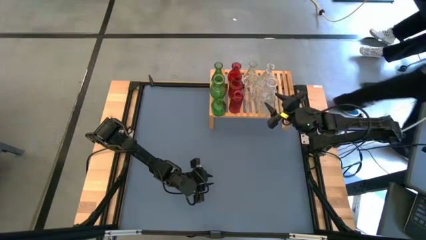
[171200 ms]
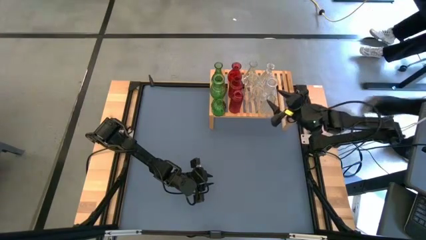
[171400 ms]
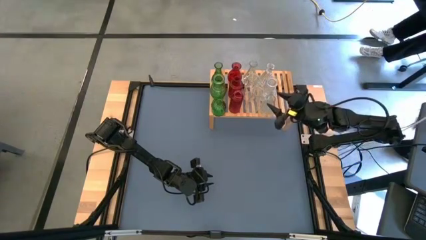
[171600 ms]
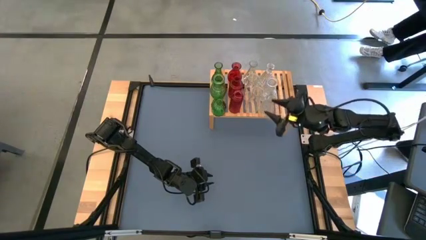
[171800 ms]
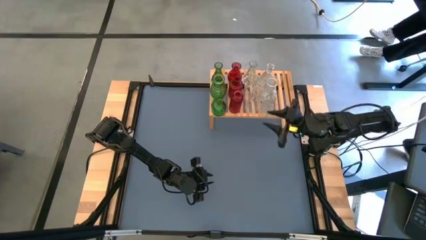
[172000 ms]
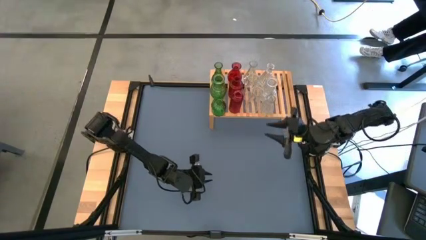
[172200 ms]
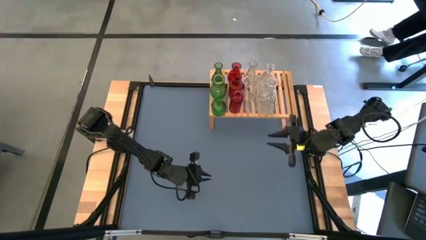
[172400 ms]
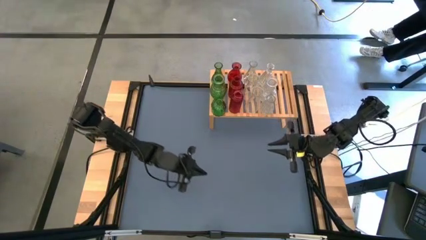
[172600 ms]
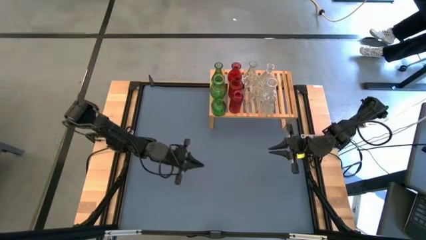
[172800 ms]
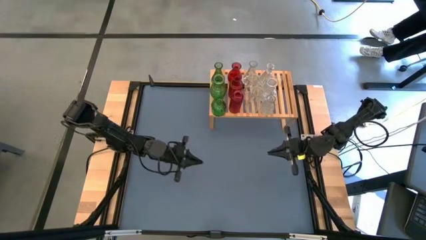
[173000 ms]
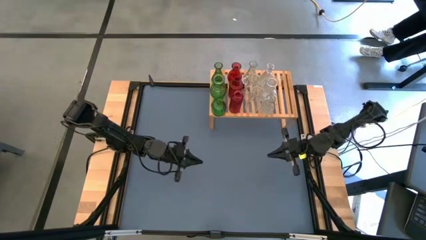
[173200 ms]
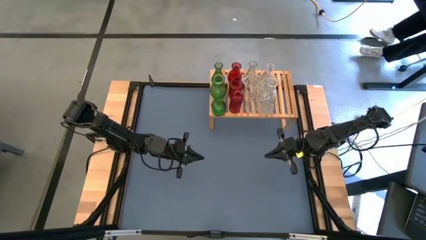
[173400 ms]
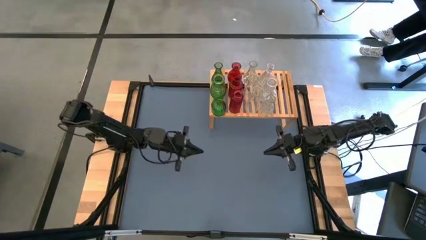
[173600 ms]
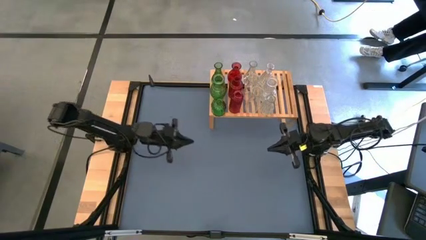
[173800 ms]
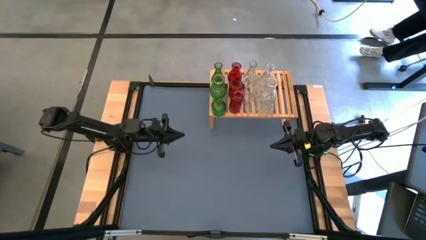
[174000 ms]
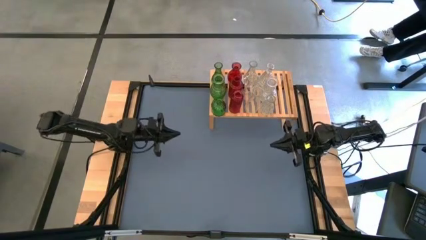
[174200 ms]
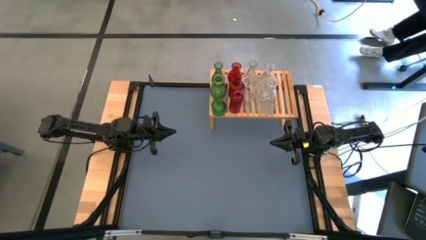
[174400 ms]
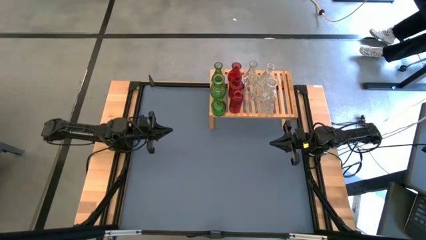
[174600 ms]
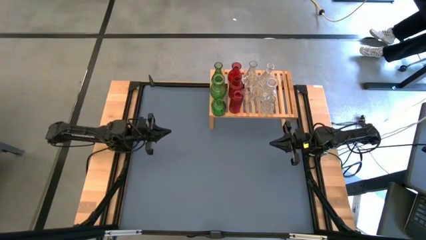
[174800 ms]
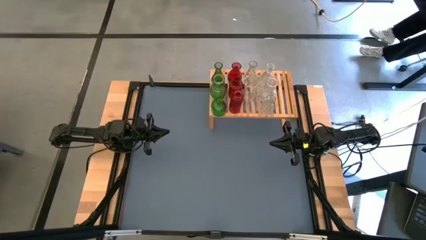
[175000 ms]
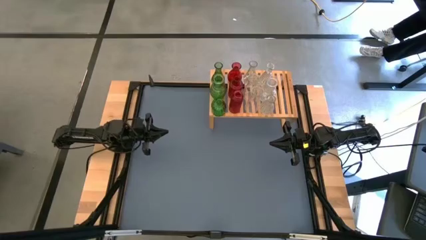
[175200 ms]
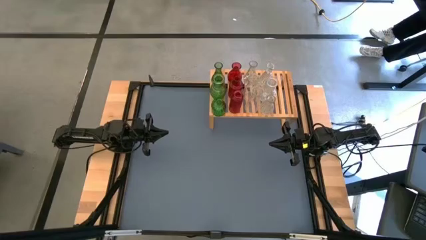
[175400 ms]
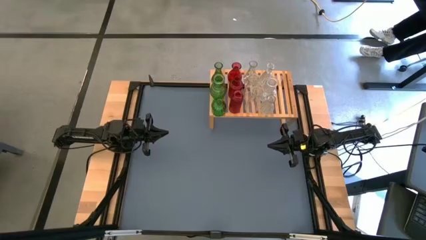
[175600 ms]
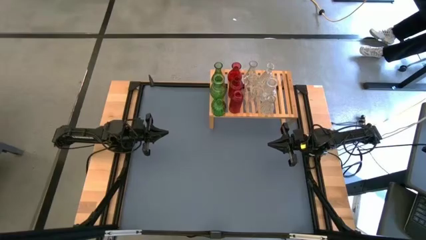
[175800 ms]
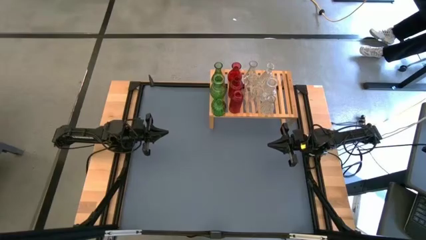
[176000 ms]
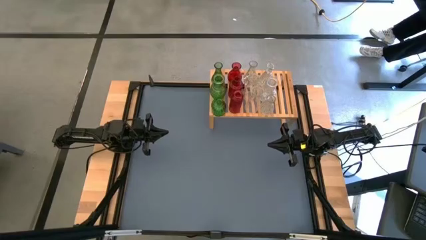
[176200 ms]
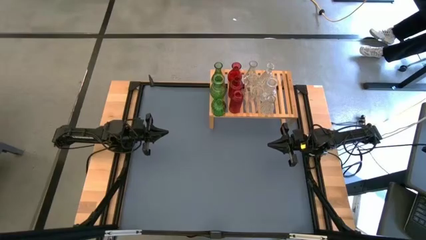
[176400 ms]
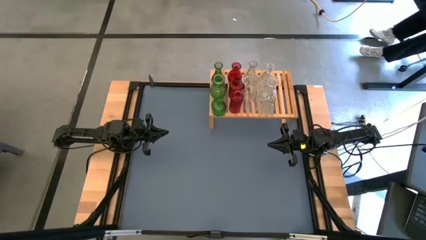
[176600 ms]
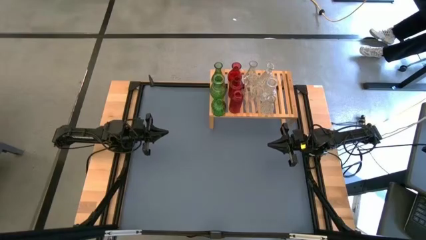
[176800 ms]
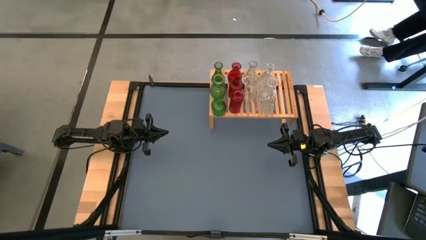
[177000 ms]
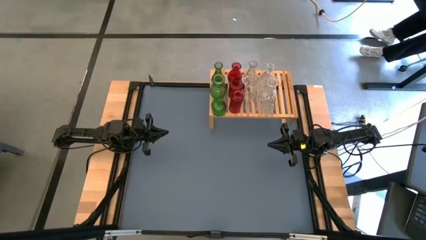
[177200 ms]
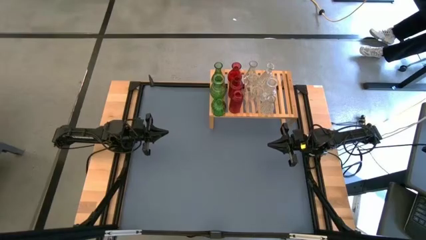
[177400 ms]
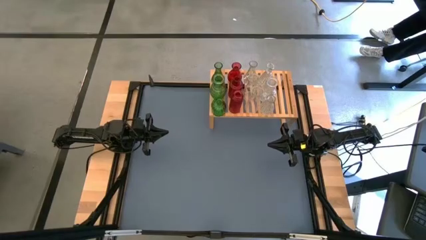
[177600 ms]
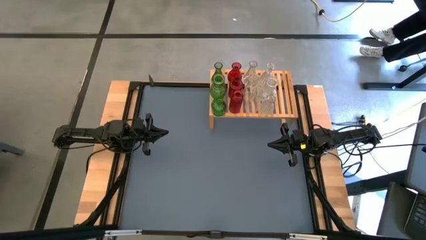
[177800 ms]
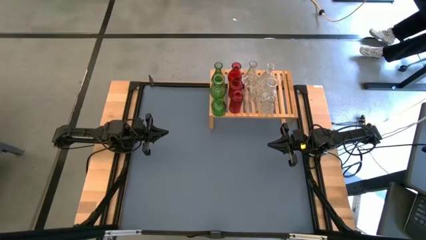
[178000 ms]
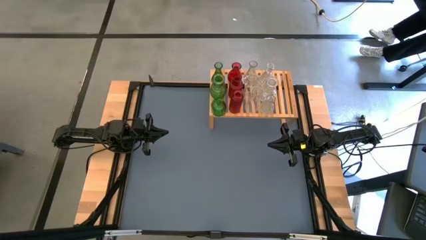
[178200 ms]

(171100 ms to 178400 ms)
Task: sort vases onto shelf
Return to Home Position

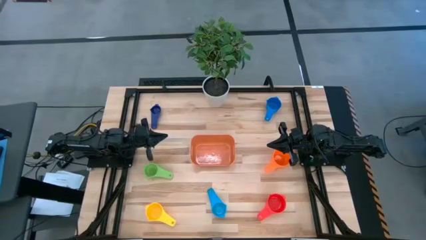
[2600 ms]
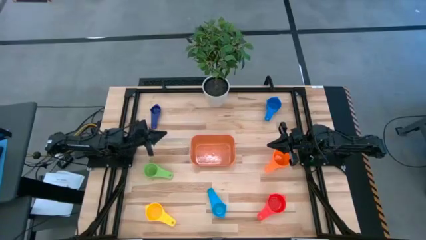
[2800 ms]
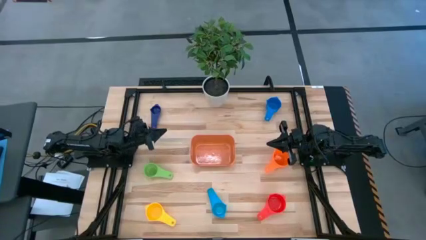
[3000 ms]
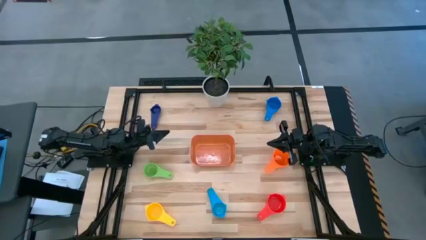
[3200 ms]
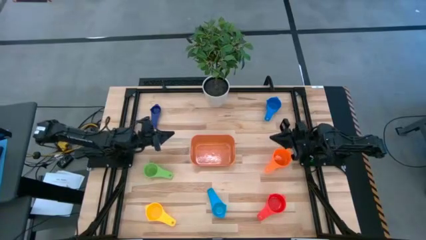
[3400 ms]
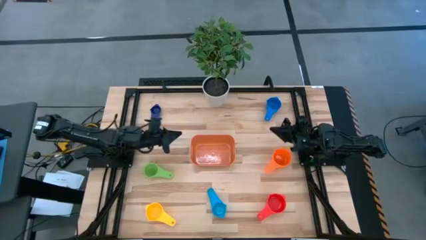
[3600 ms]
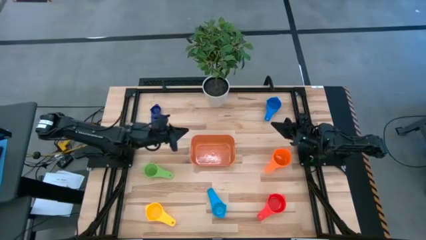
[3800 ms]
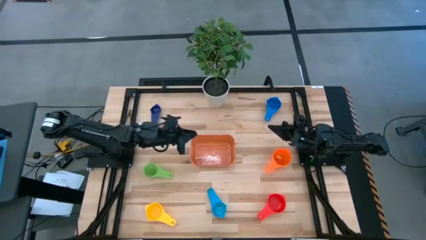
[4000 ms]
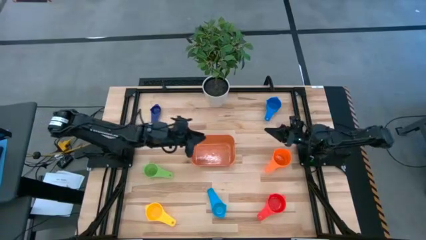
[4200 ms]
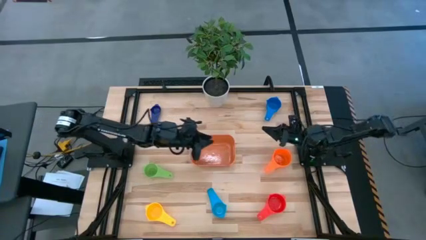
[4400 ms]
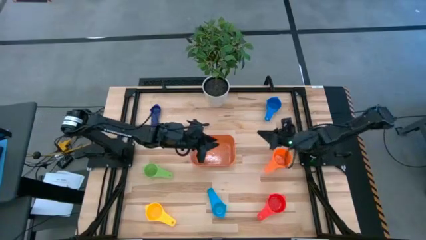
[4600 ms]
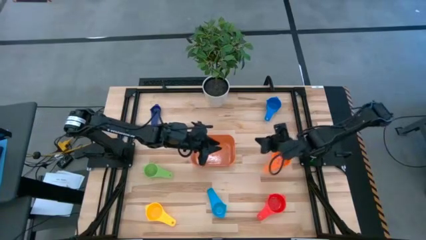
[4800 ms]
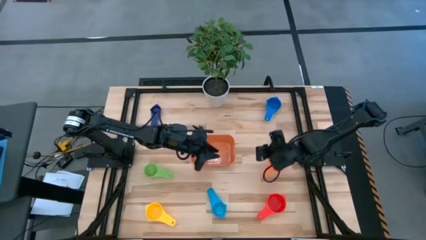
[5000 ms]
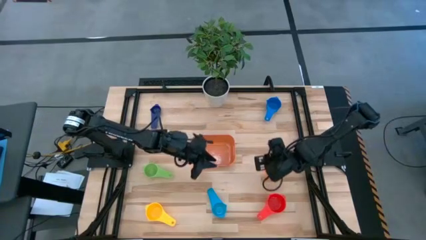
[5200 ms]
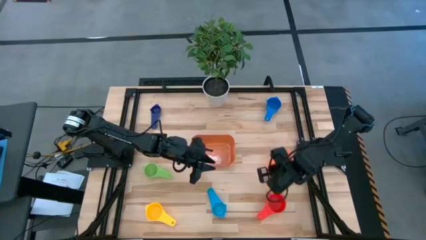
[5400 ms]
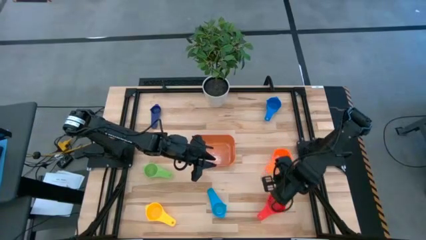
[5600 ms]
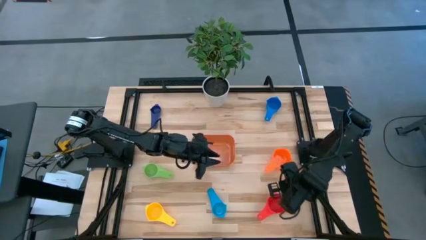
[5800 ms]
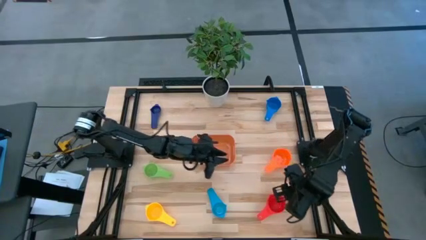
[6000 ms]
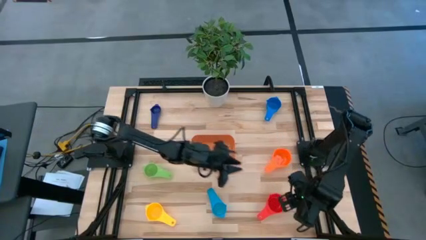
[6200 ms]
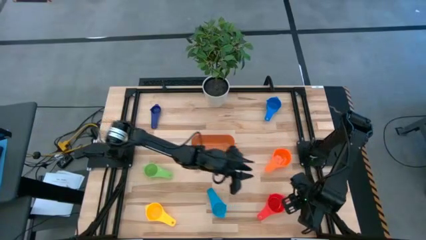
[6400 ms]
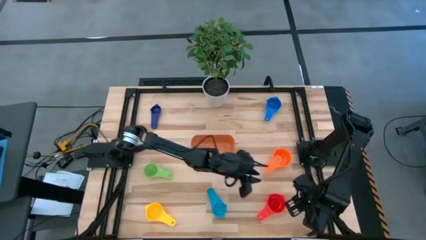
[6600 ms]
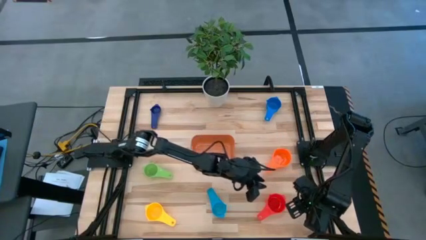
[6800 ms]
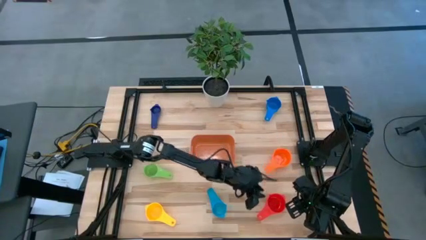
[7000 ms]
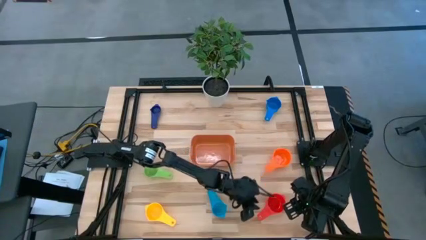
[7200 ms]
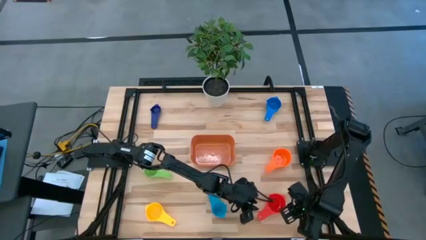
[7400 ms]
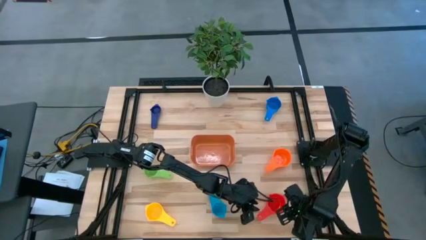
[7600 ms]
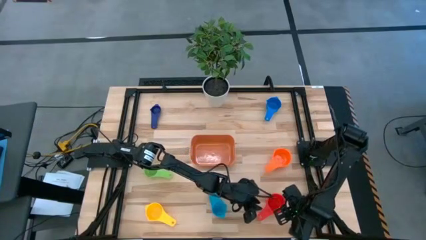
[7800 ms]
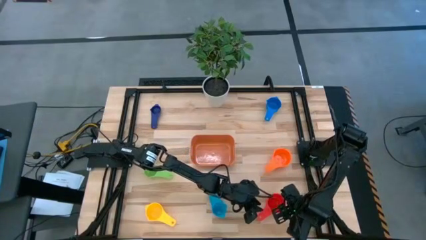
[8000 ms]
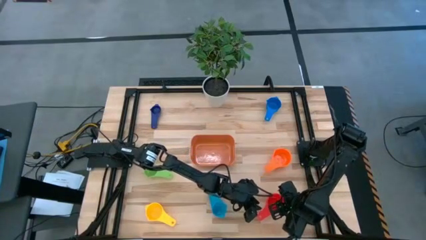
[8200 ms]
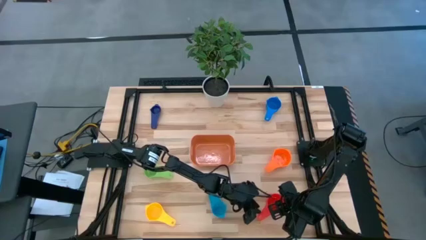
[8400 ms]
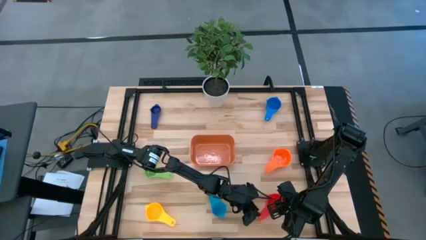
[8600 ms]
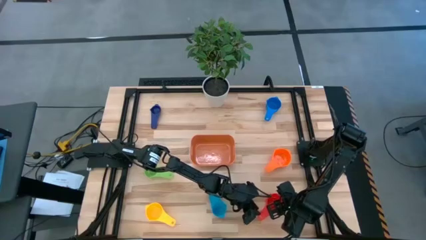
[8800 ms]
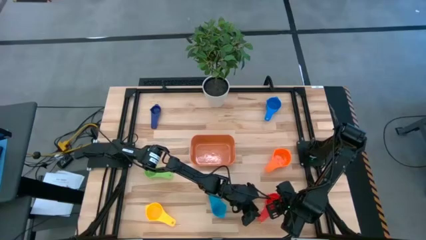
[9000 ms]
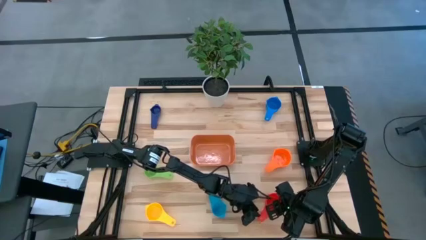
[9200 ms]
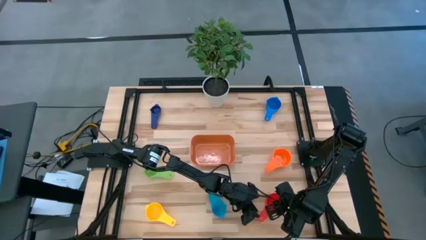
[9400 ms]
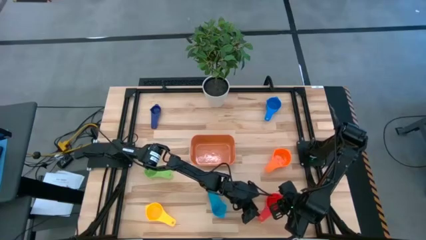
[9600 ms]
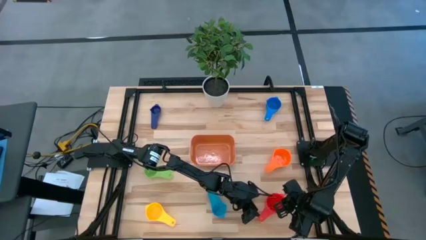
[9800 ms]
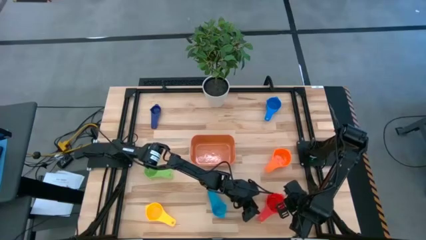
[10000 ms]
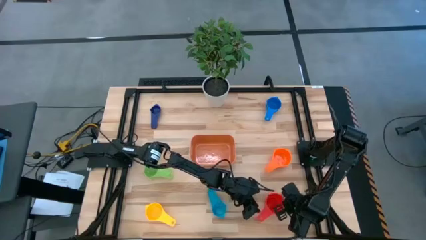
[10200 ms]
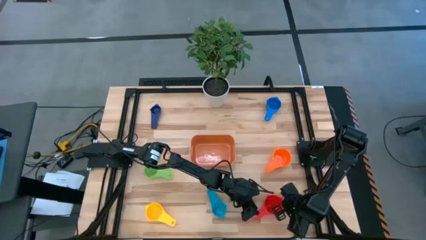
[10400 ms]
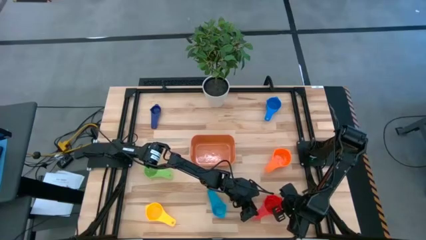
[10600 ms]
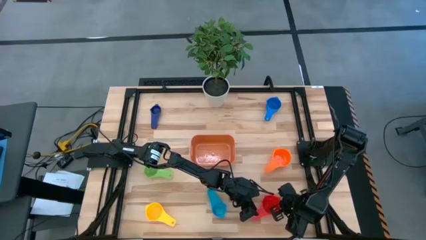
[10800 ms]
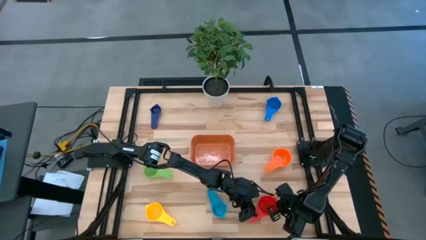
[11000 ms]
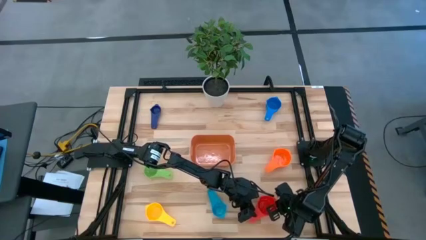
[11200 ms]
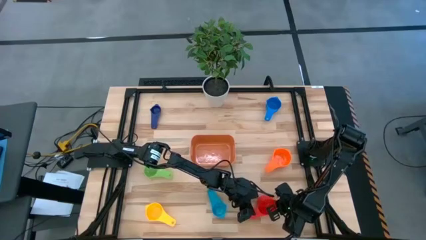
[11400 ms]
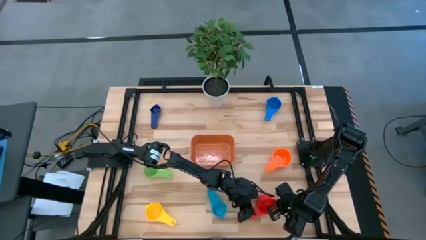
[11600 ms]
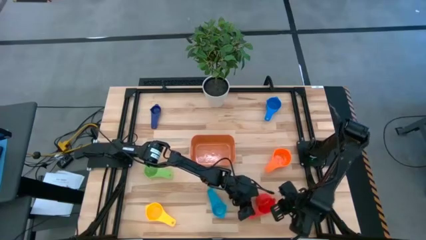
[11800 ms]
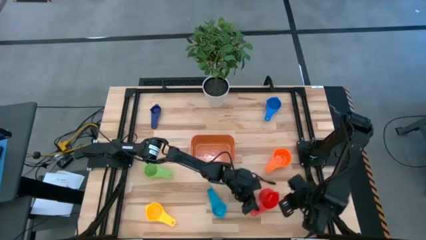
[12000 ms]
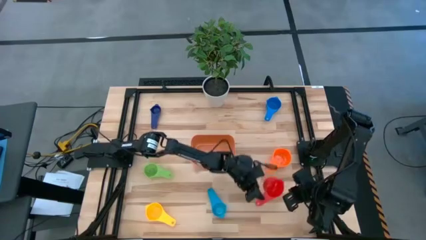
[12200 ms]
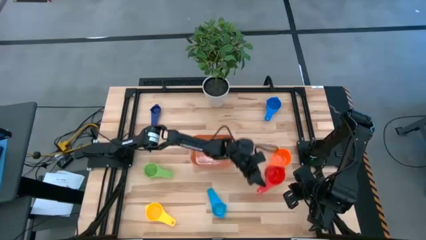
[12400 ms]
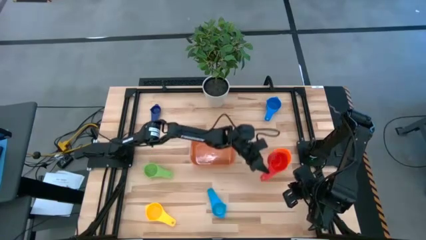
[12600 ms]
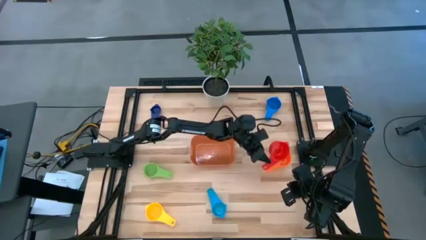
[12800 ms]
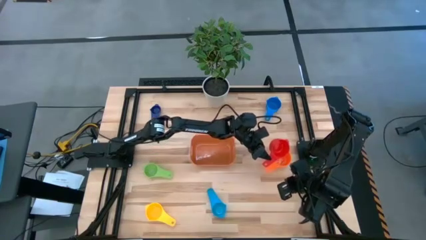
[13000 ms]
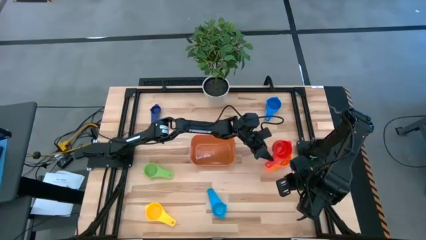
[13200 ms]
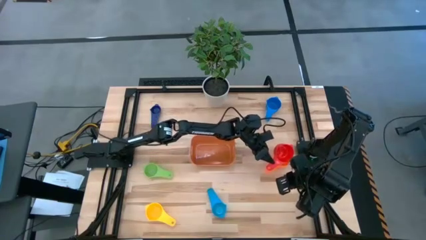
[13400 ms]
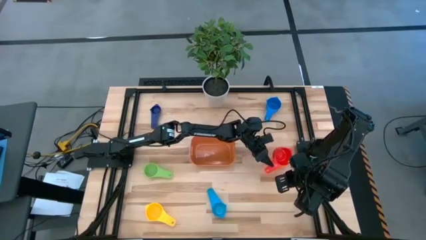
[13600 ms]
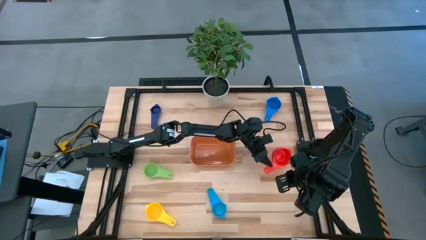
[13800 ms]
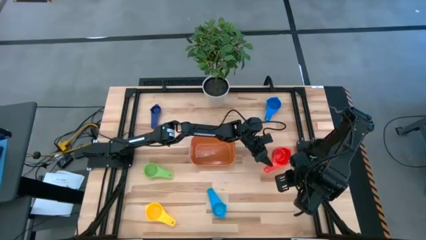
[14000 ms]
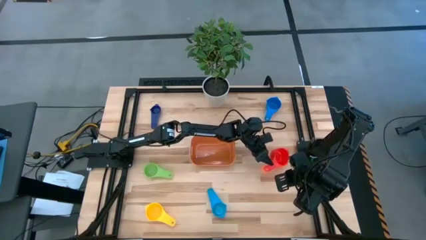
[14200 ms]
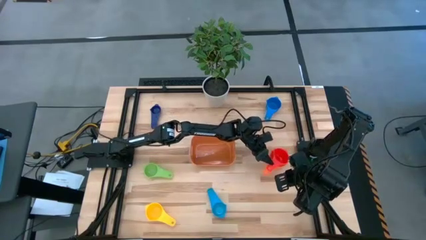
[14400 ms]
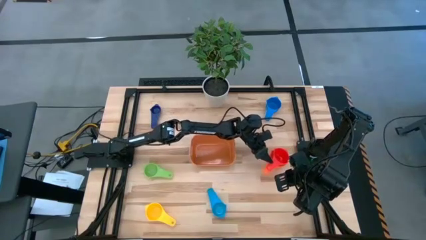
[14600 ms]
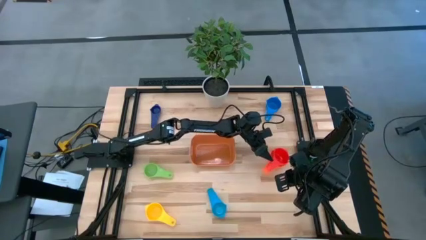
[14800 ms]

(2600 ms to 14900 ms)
Task: Nest measuring cups in basket
Stack the red measuring cup on top of the orange measuring cup
